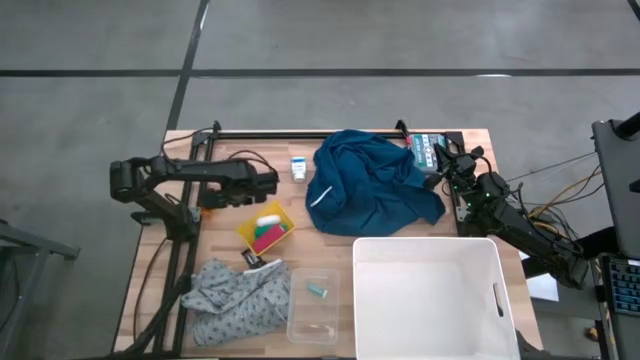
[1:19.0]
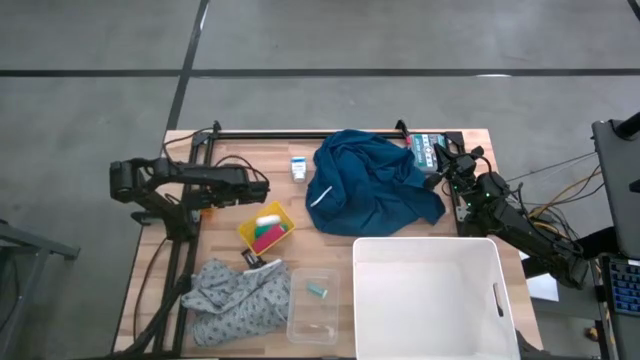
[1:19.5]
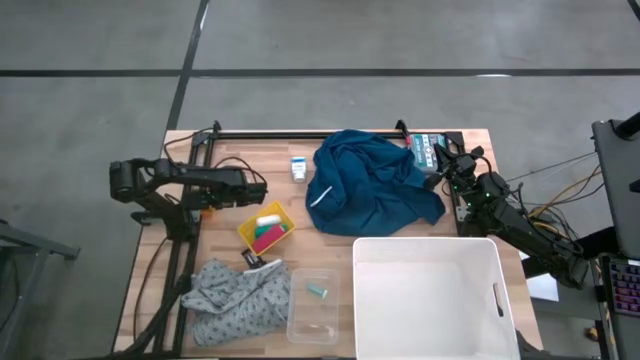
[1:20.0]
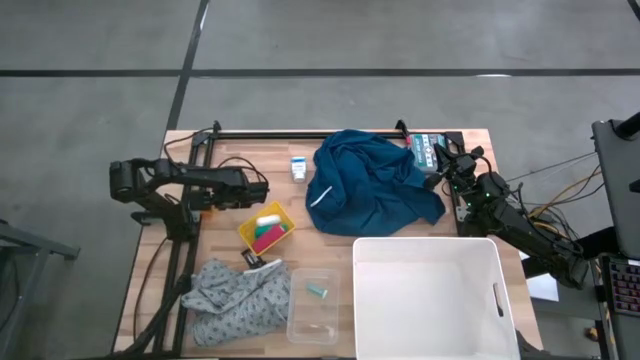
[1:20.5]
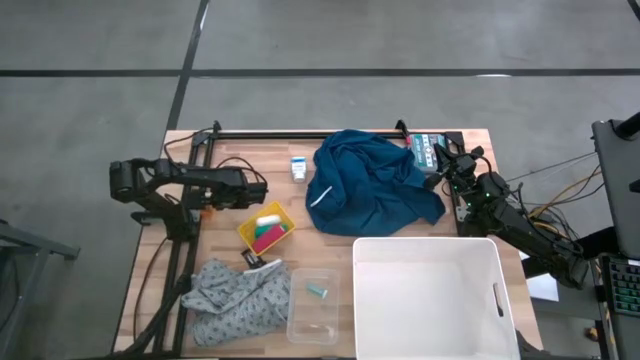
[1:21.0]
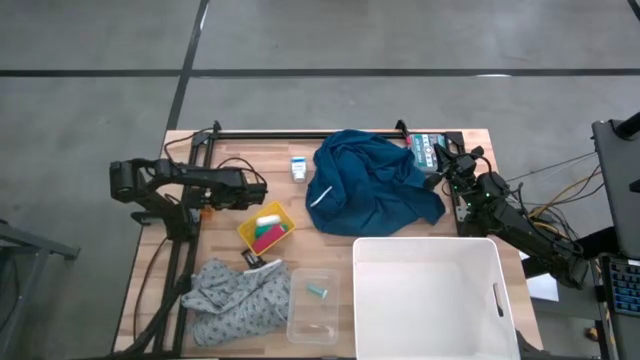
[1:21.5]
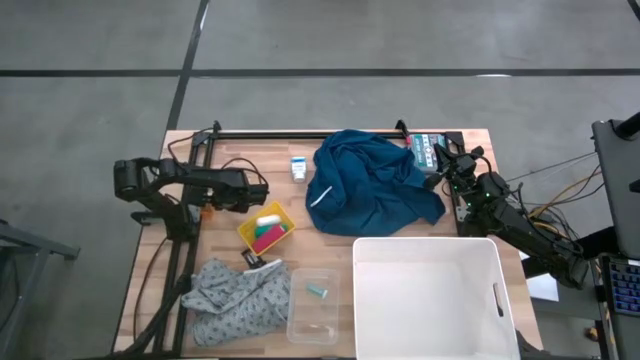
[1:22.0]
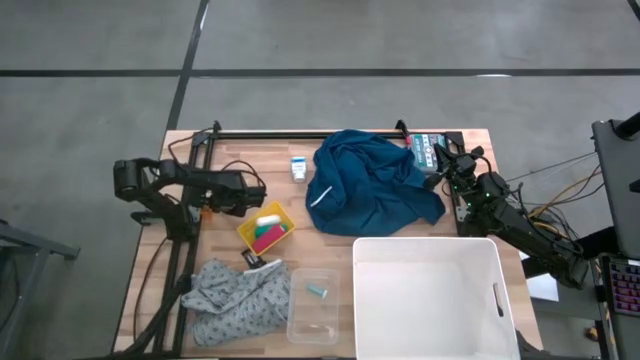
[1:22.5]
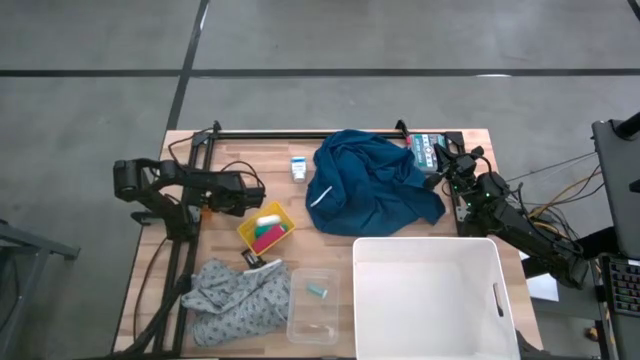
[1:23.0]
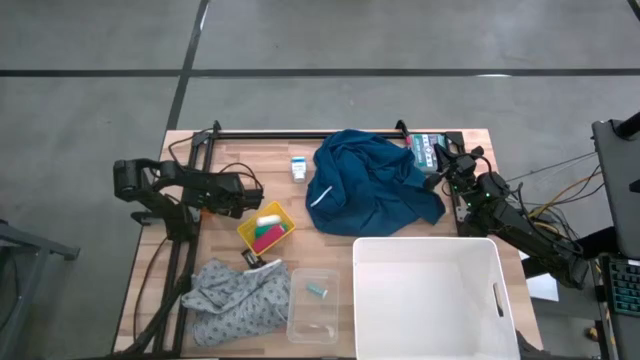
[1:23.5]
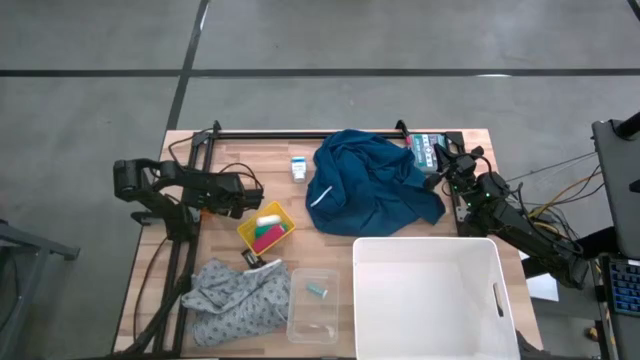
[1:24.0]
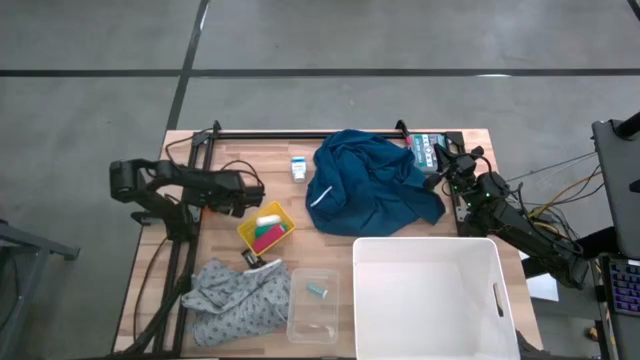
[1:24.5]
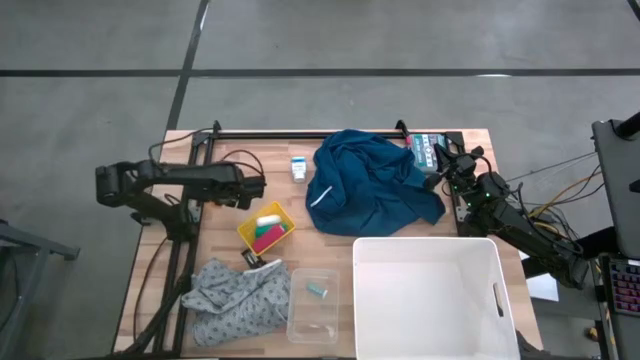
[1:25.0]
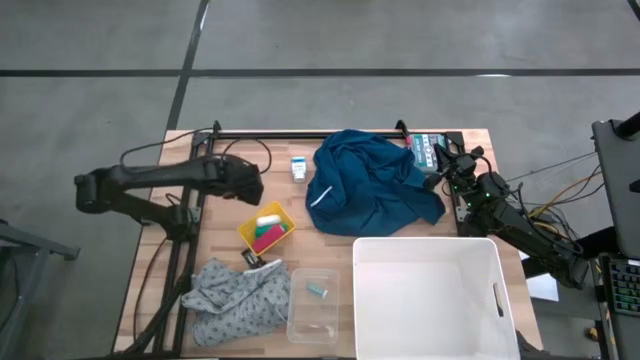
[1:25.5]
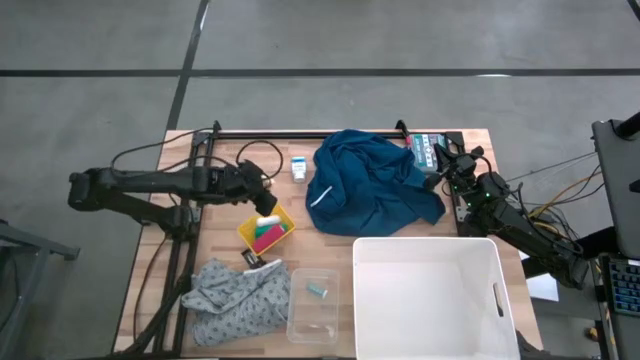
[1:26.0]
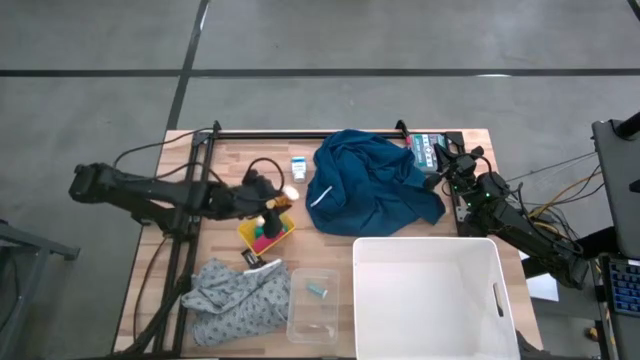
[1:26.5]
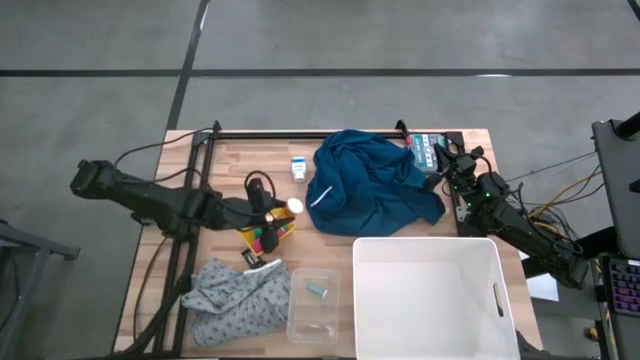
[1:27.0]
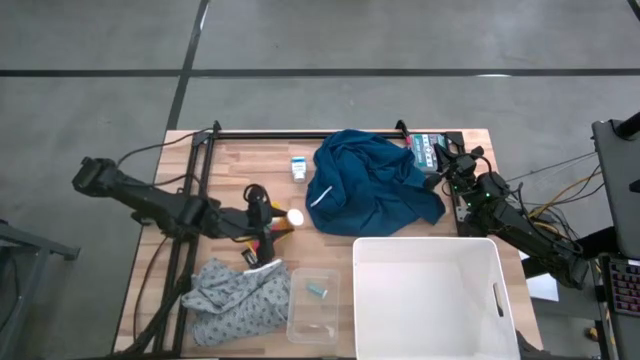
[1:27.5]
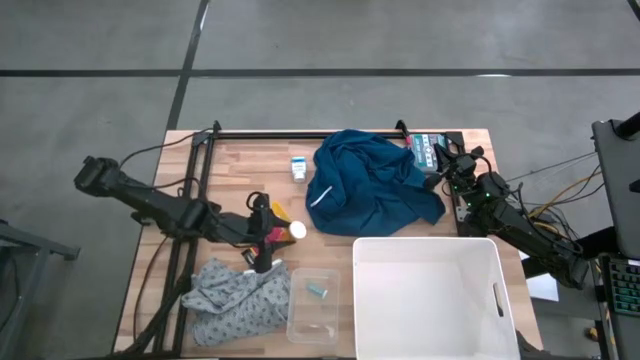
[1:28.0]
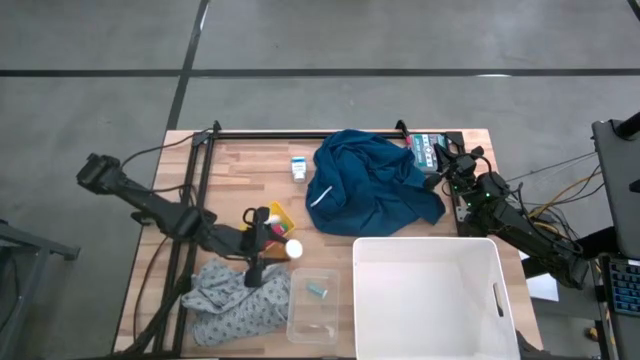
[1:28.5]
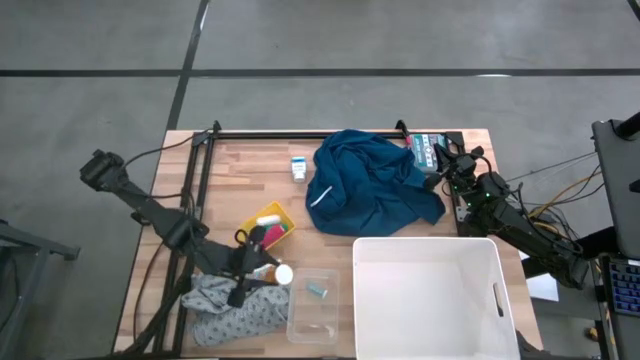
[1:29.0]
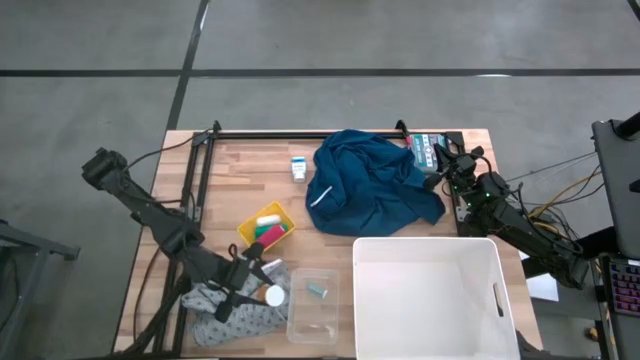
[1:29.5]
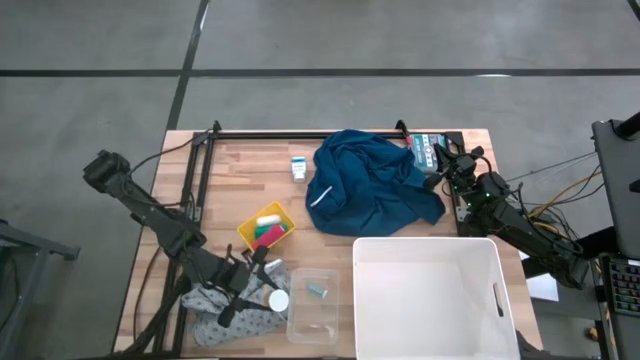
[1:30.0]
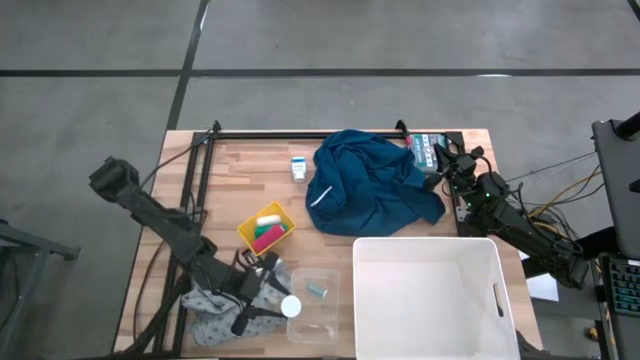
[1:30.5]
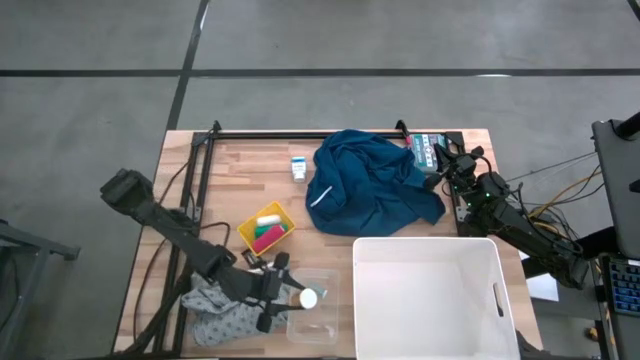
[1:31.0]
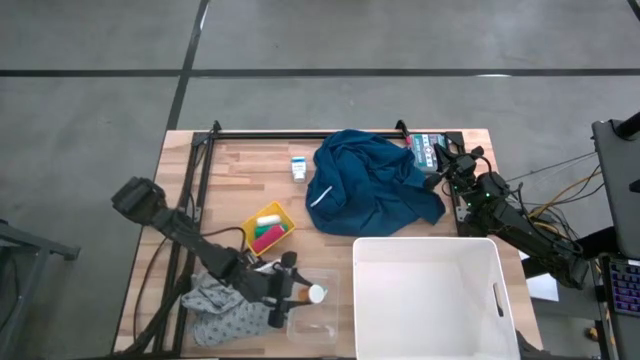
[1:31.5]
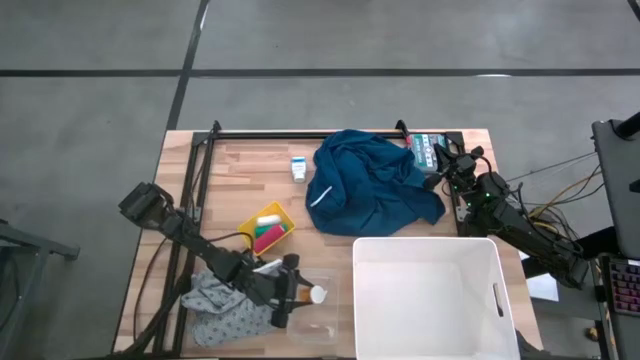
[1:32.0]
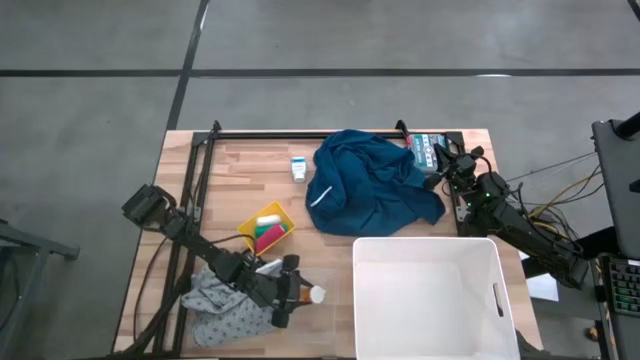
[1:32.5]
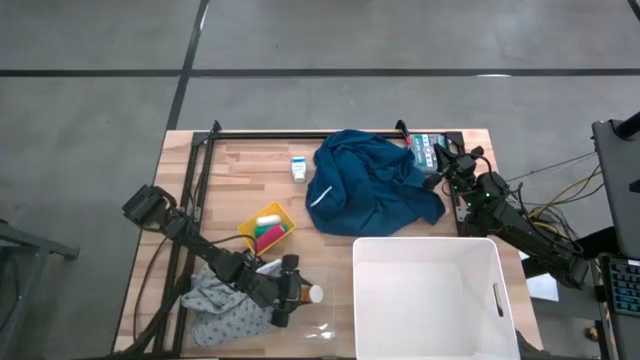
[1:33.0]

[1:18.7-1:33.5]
Task: Pick & Place Medicine items
Put the orange pill bottle into the transparent bin

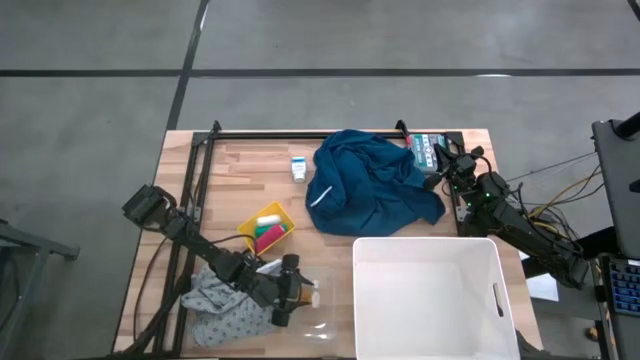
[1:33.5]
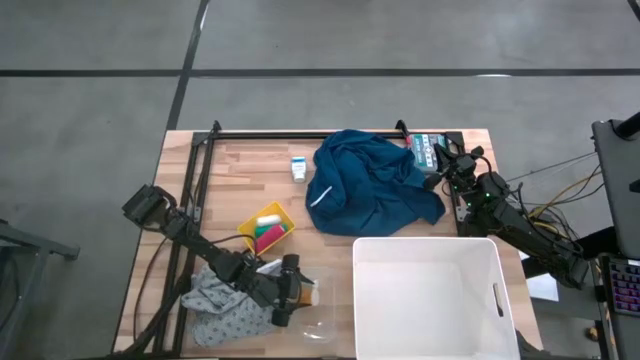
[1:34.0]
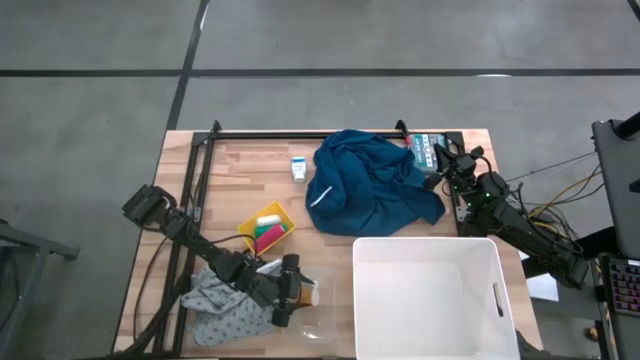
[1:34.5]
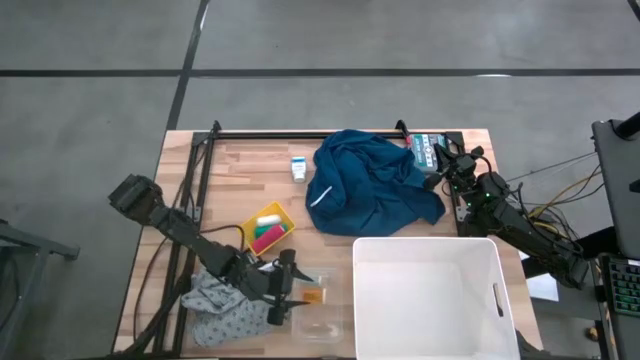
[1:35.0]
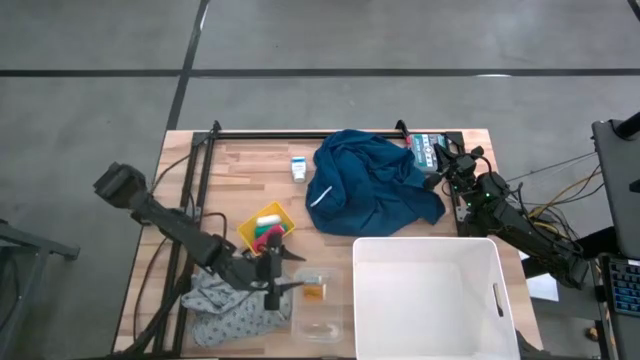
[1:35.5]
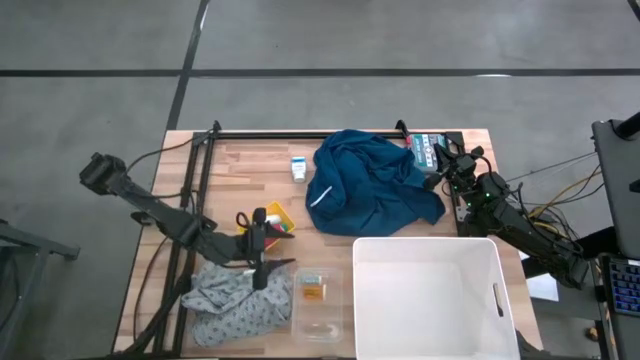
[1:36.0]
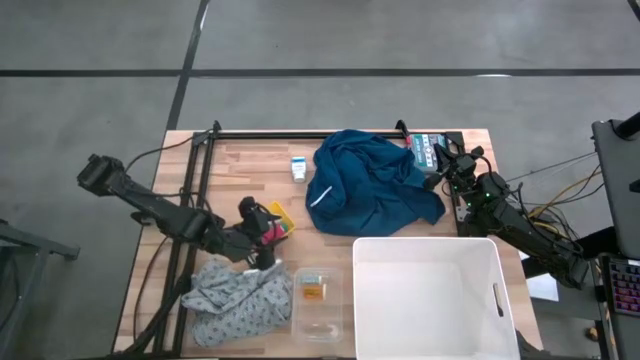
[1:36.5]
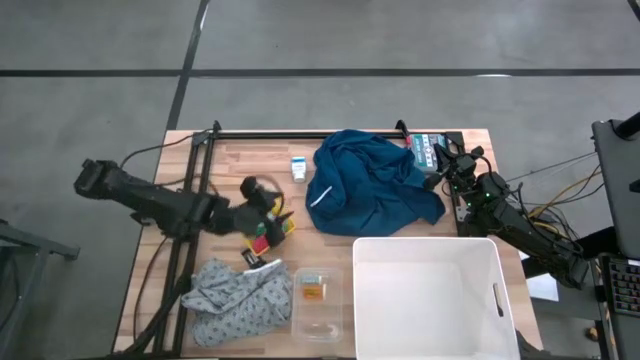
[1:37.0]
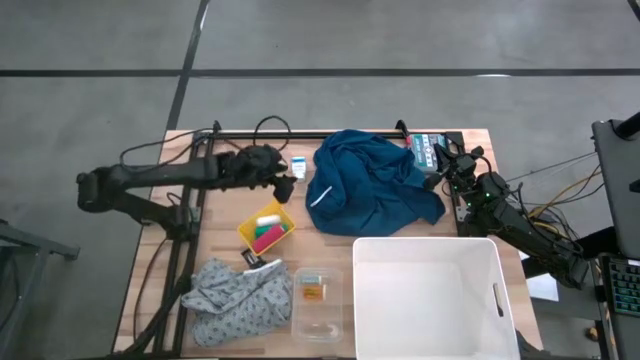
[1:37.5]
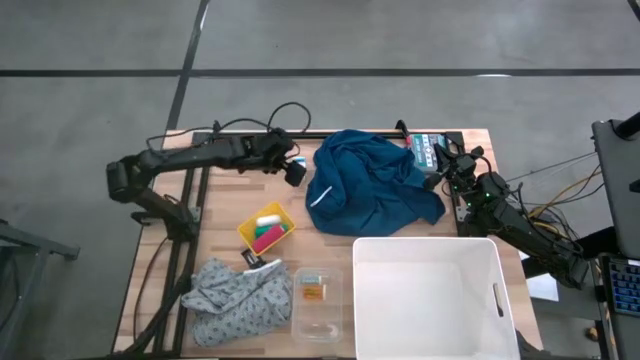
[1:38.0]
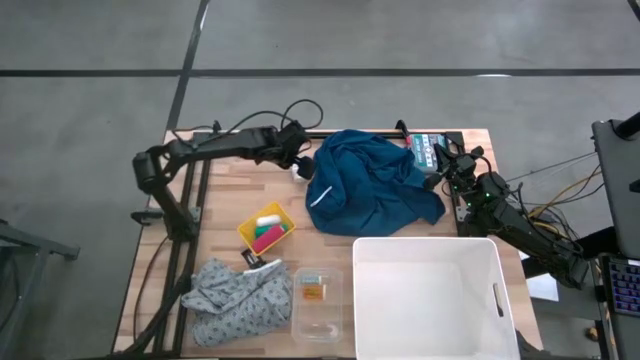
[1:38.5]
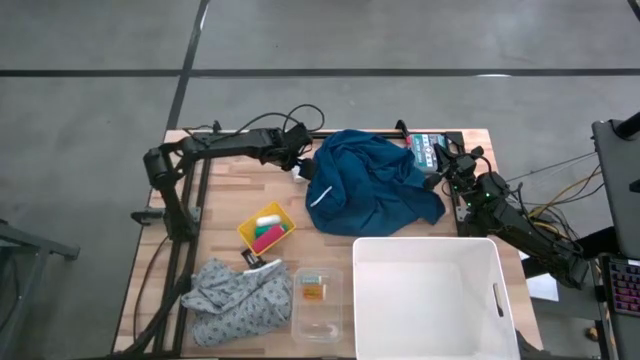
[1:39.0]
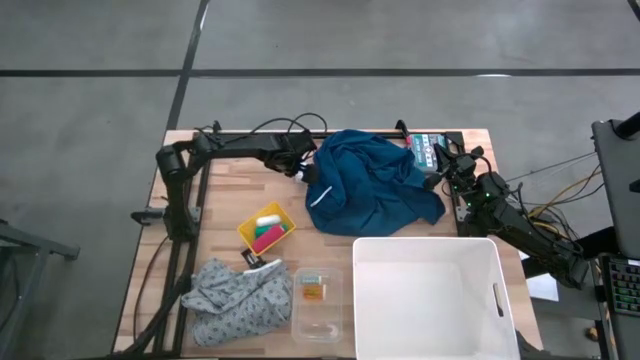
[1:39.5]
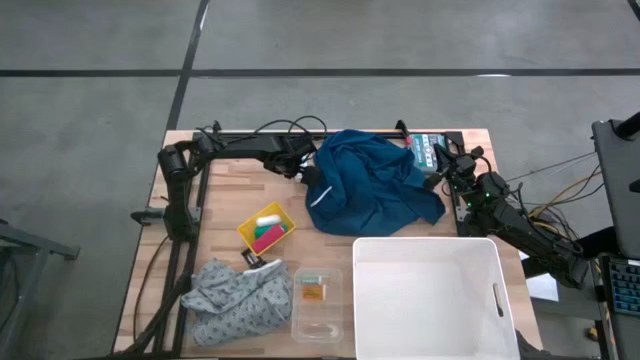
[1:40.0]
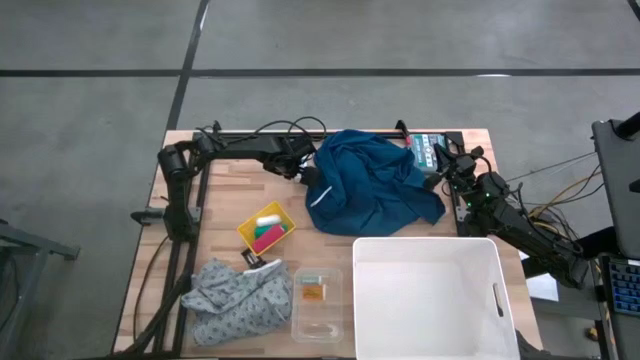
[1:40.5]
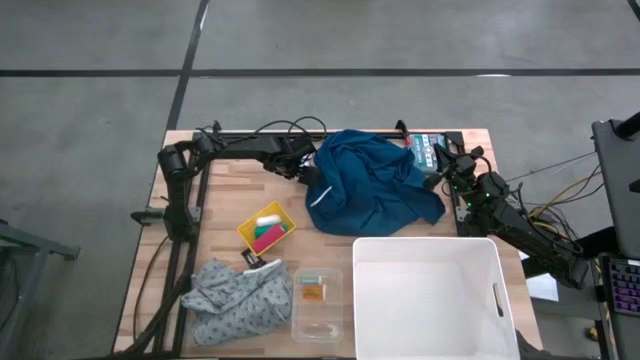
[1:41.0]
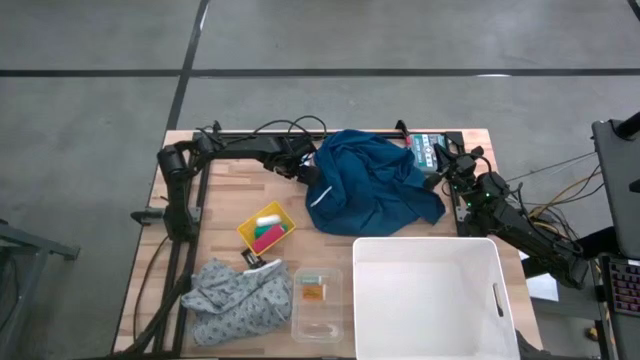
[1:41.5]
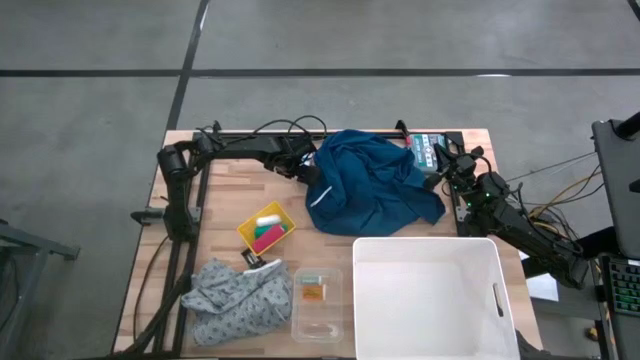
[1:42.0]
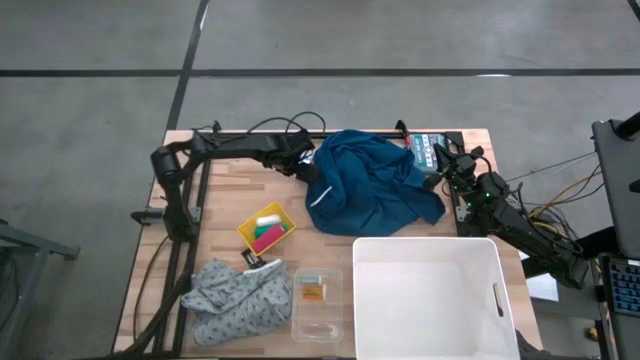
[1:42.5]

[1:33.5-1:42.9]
Put the white blue pill bottle into the transparent bin
